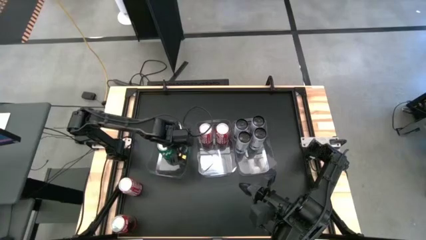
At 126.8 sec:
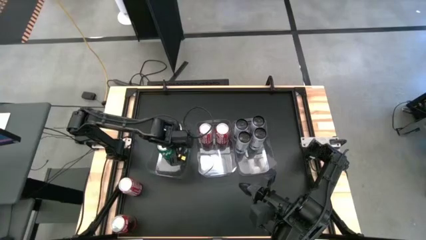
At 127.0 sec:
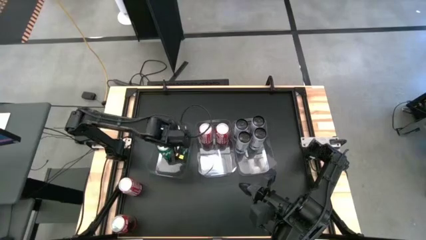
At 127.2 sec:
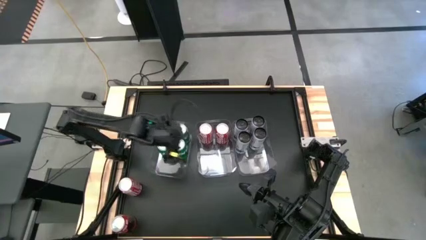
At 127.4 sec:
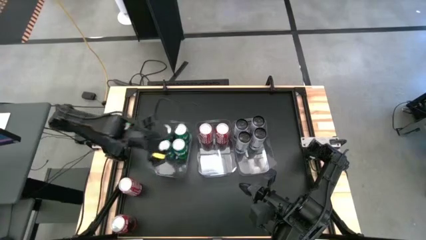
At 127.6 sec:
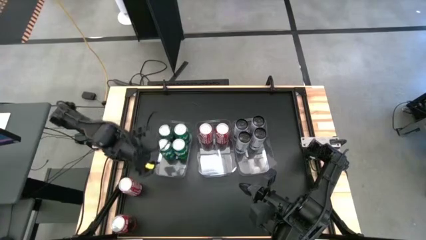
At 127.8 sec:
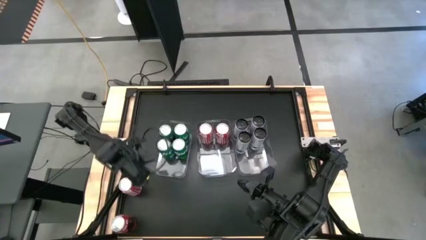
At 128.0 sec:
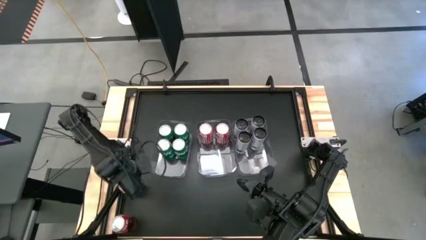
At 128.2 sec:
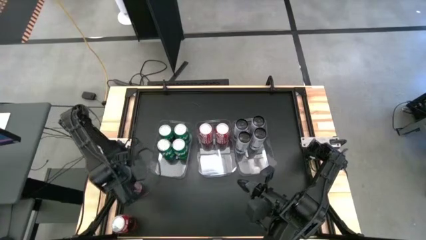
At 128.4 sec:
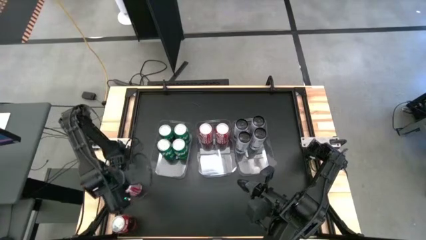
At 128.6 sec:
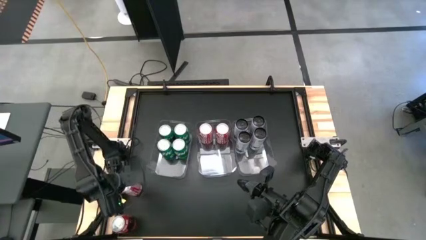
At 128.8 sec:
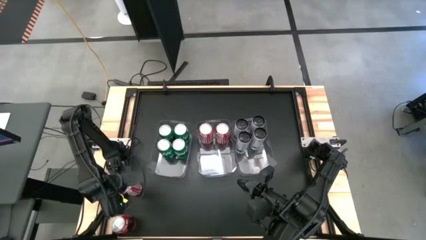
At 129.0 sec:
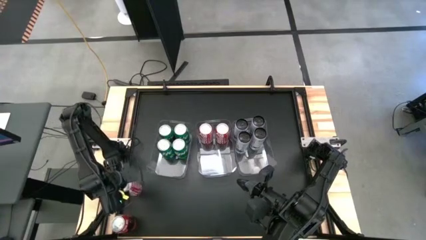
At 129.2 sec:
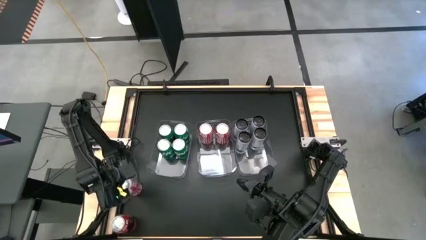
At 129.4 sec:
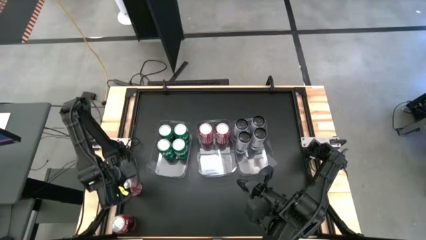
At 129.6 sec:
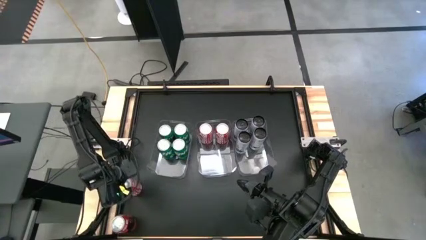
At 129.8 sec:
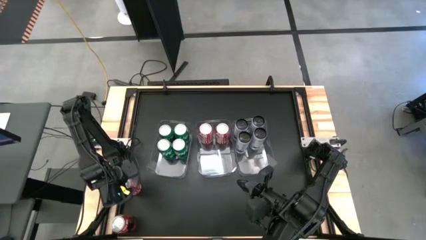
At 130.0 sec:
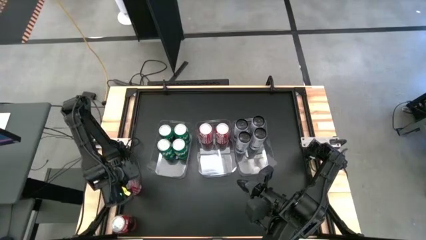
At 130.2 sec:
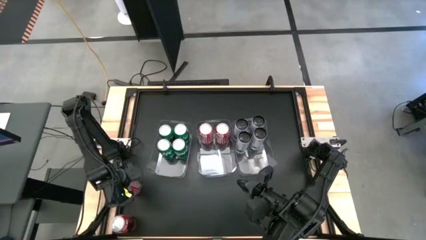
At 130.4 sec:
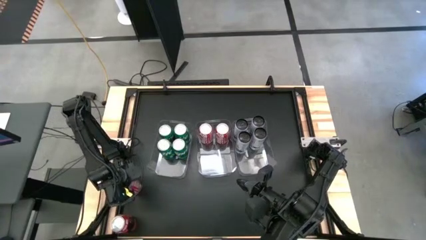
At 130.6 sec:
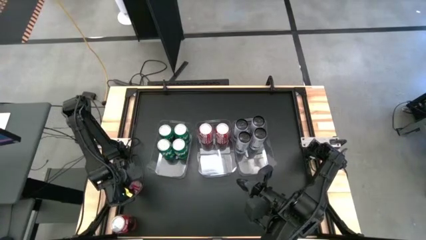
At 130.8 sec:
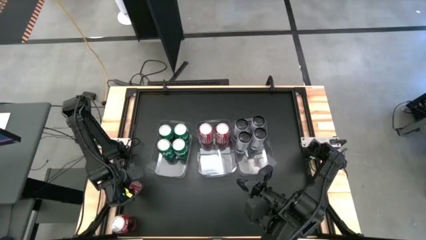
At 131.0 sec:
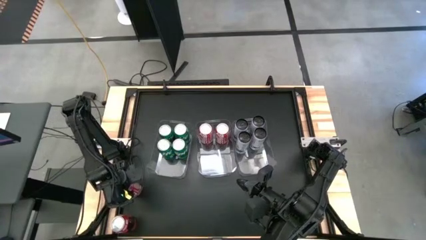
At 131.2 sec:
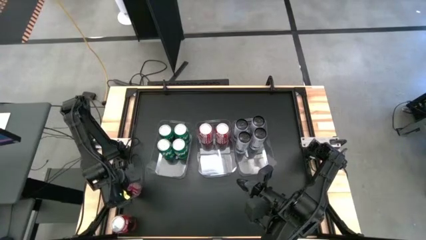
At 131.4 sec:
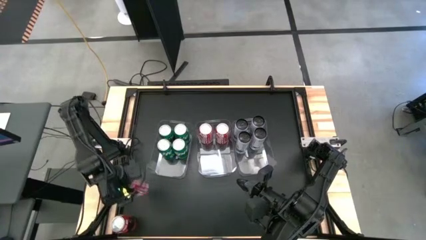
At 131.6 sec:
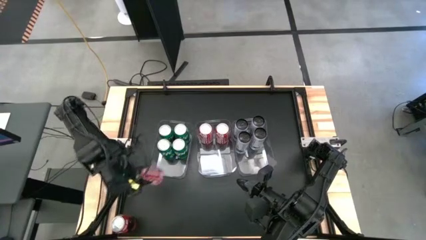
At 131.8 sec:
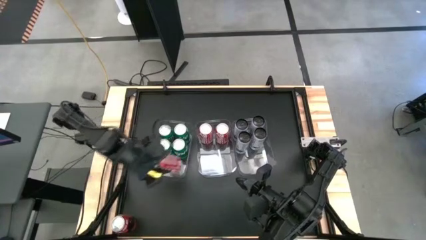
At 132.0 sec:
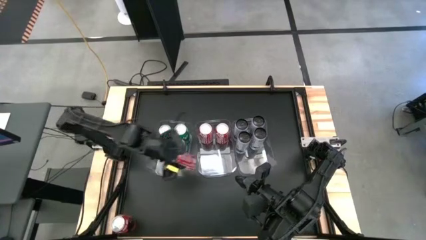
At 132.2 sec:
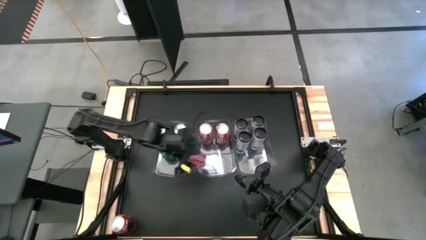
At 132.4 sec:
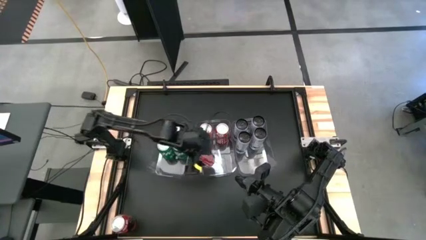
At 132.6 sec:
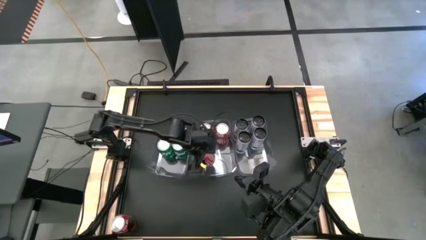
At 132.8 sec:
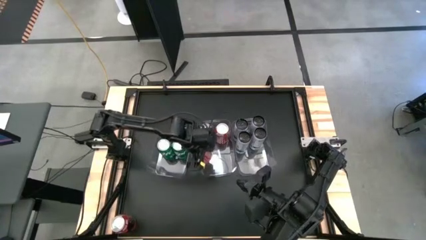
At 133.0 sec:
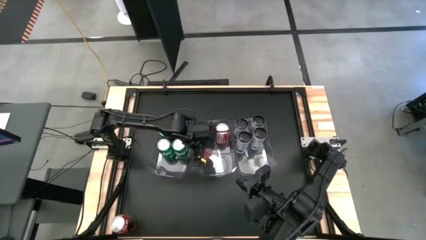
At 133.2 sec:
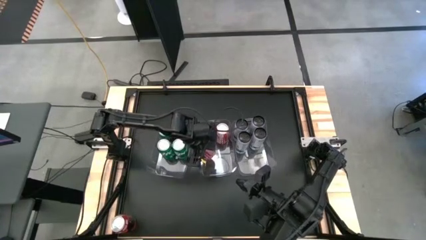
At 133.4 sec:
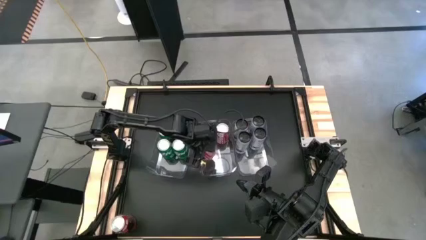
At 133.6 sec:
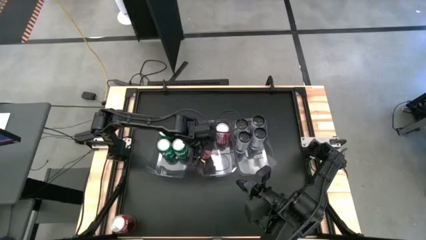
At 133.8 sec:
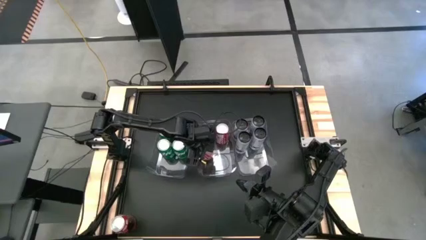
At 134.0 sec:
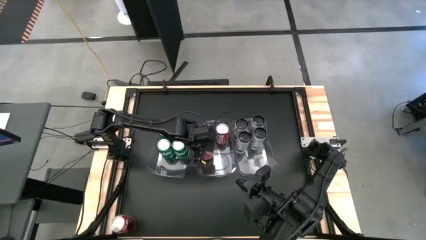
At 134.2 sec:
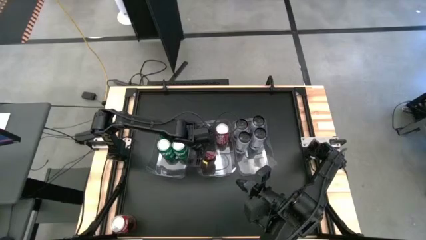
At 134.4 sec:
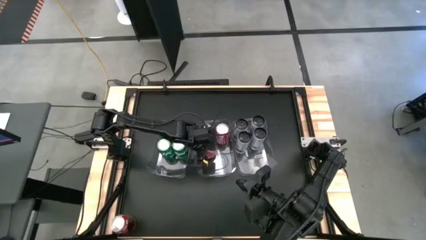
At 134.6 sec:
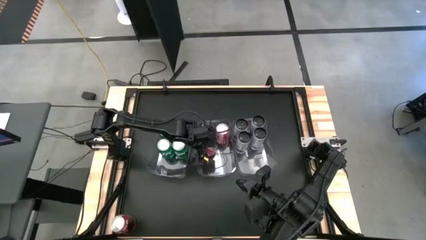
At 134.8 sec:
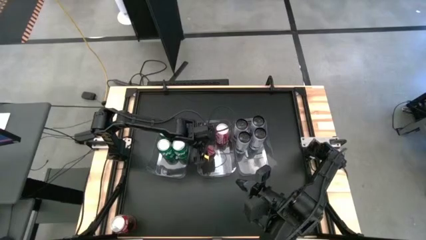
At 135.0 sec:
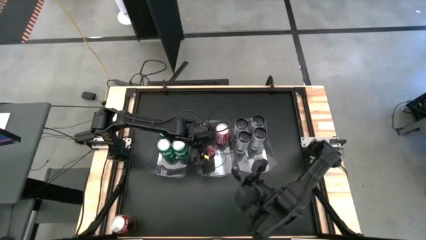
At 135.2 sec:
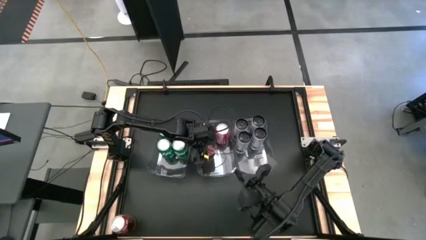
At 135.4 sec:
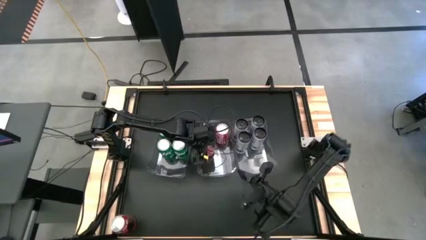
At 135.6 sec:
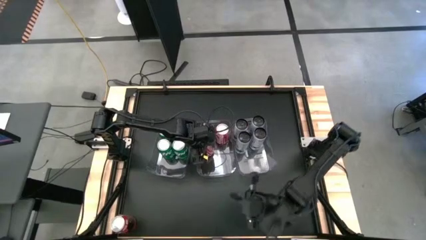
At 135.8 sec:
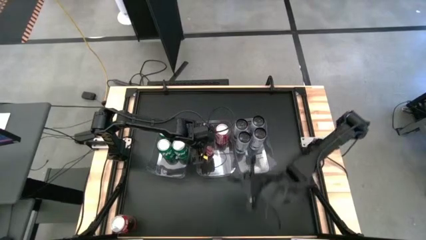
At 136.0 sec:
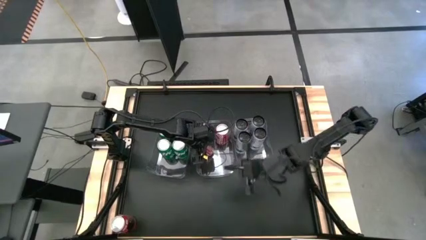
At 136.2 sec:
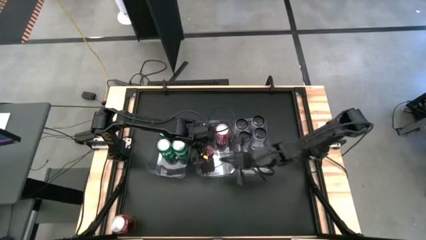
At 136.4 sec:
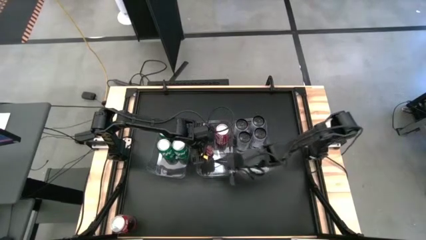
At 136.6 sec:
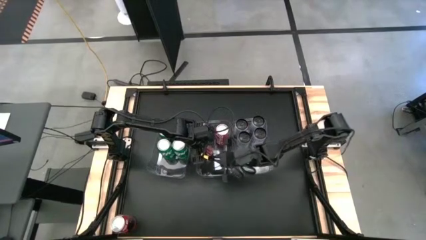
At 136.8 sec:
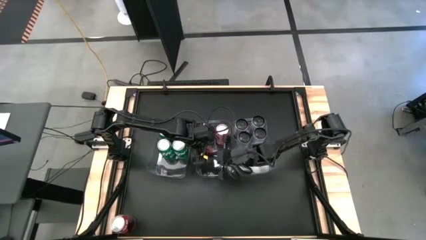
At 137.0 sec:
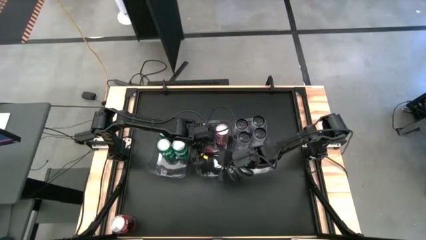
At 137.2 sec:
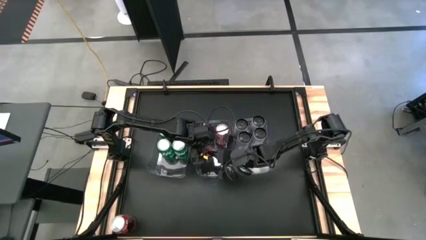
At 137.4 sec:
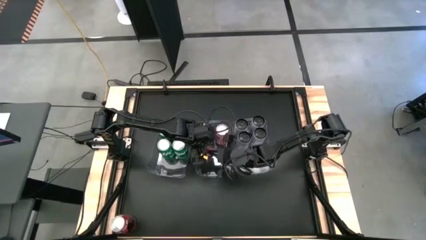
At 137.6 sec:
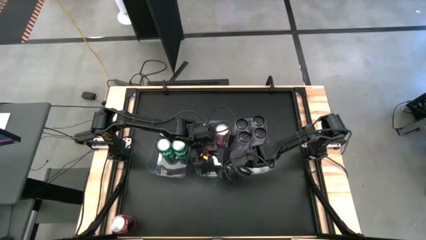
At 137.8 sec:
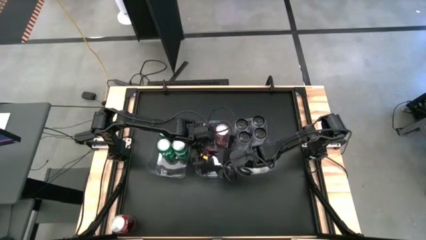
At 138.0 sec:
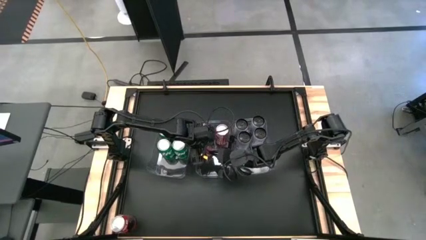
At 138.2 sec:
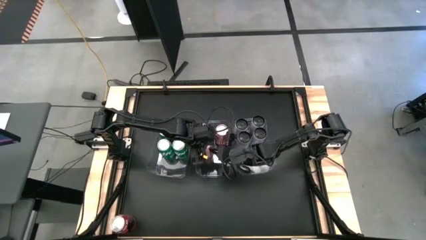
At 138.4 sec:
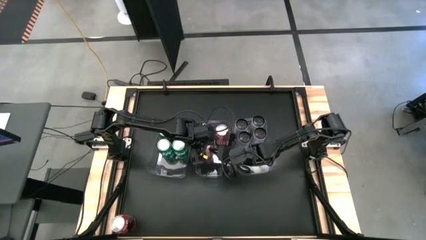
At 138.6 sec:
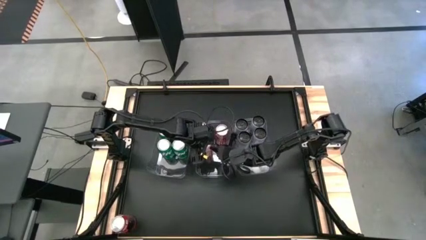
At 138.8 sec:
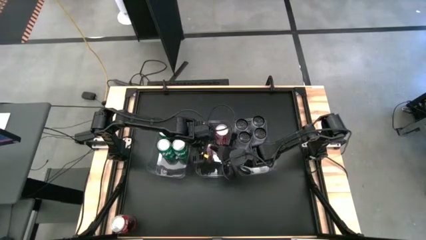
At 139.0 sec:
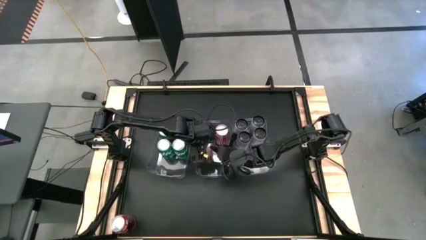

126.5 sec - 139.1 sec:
Task: Sort soda cans
Put the top red soda can into the middle transparent bin
